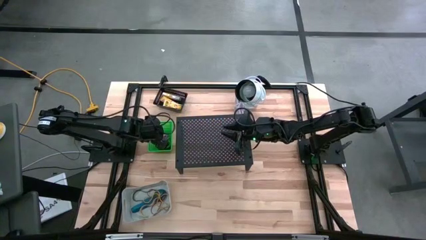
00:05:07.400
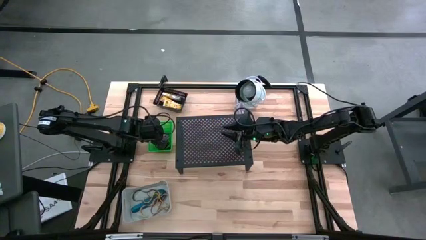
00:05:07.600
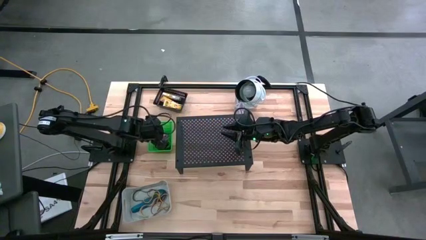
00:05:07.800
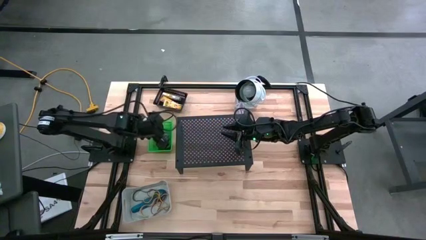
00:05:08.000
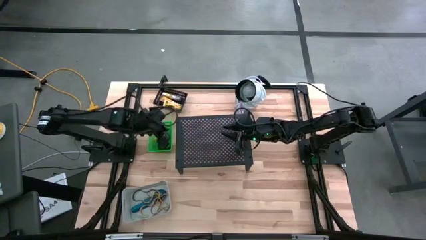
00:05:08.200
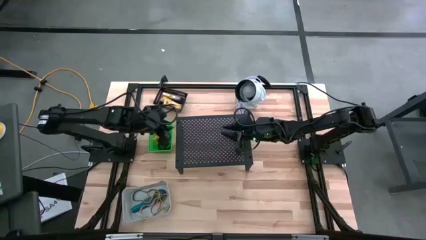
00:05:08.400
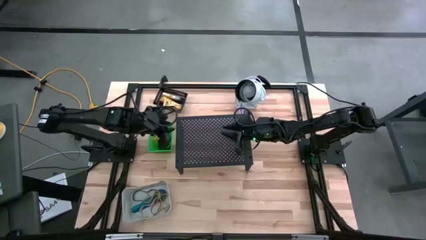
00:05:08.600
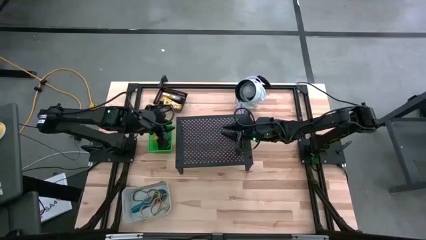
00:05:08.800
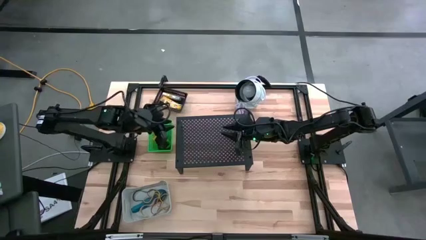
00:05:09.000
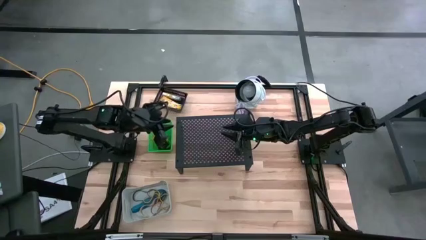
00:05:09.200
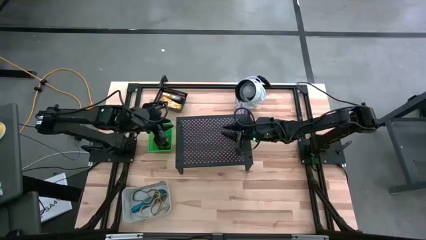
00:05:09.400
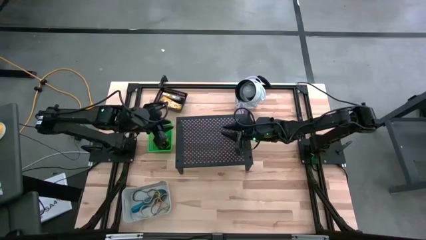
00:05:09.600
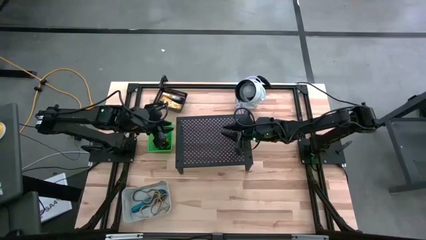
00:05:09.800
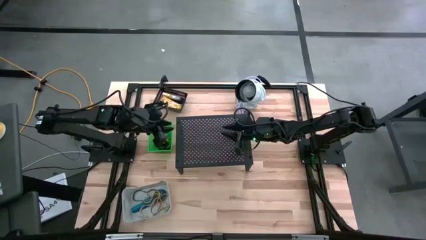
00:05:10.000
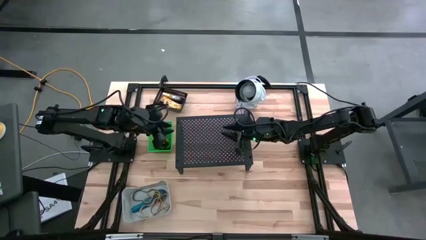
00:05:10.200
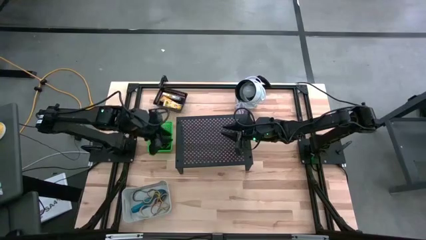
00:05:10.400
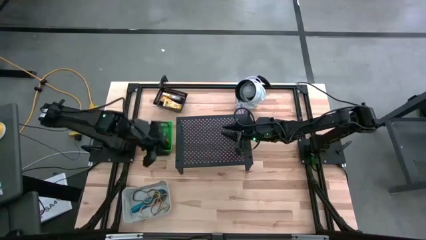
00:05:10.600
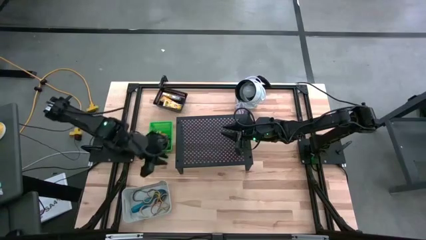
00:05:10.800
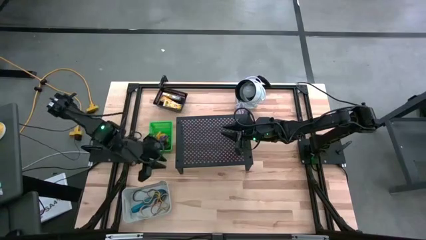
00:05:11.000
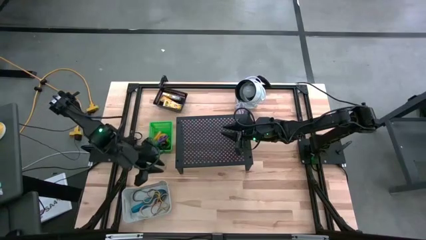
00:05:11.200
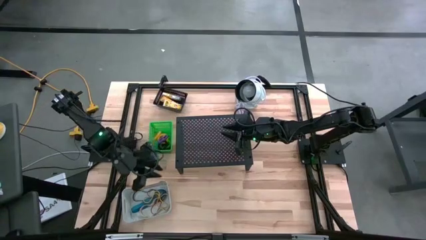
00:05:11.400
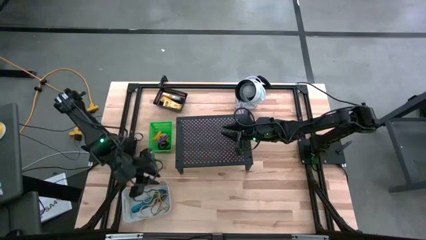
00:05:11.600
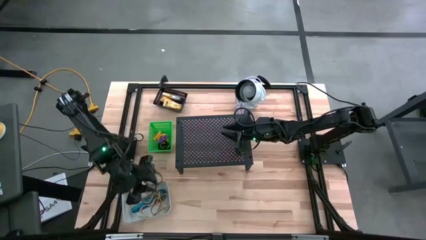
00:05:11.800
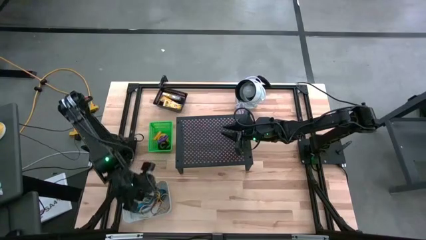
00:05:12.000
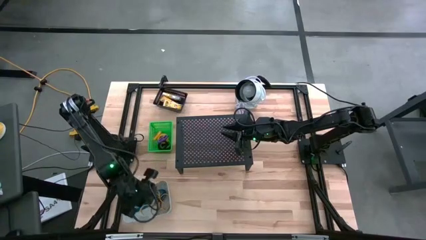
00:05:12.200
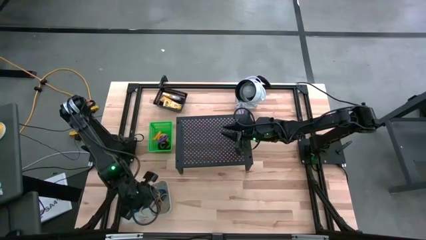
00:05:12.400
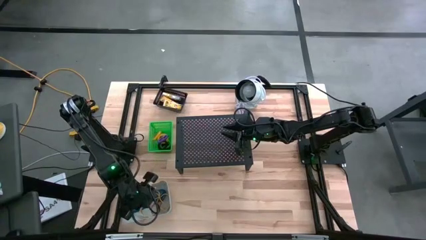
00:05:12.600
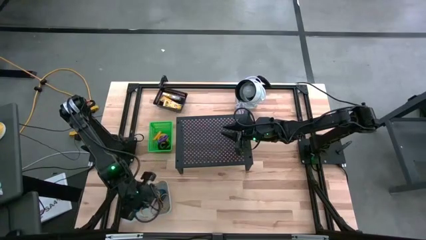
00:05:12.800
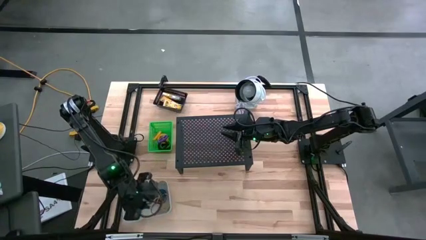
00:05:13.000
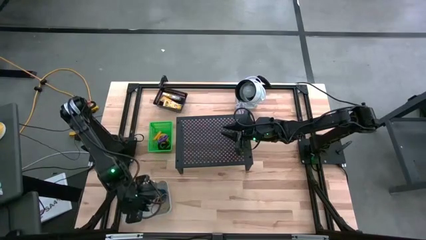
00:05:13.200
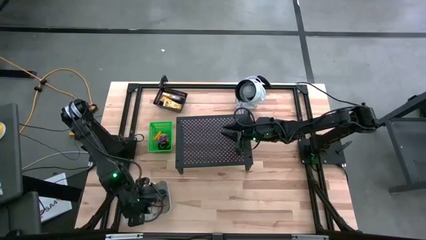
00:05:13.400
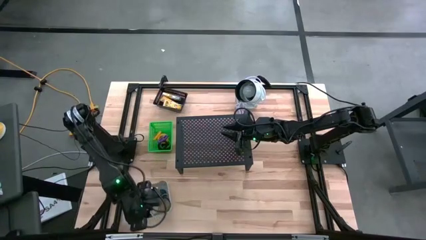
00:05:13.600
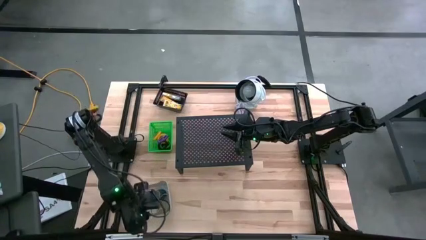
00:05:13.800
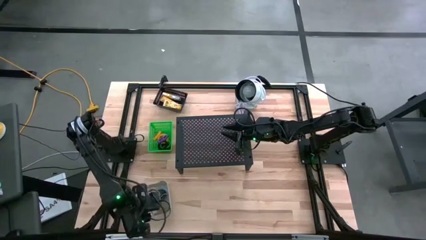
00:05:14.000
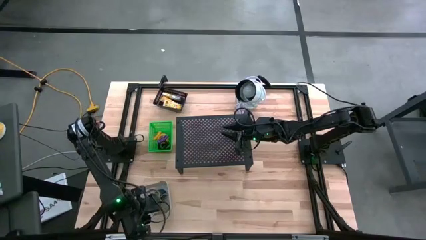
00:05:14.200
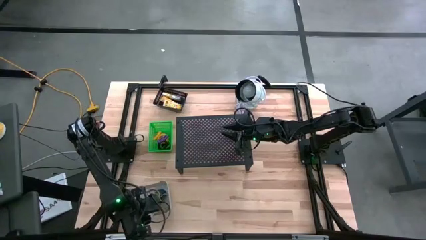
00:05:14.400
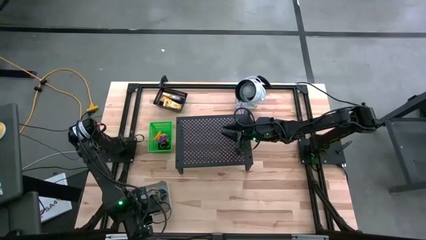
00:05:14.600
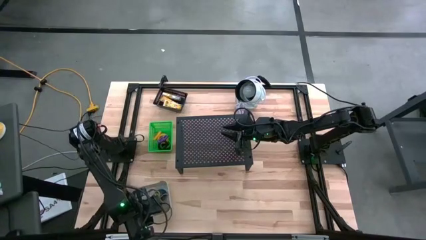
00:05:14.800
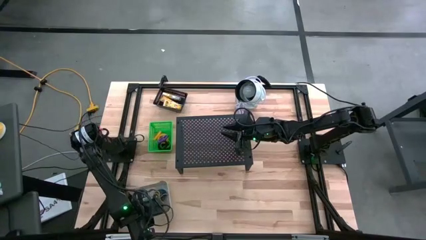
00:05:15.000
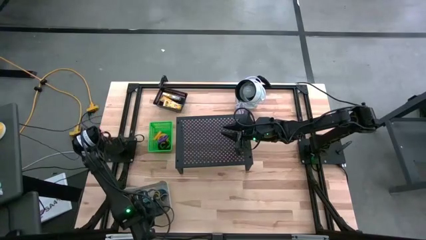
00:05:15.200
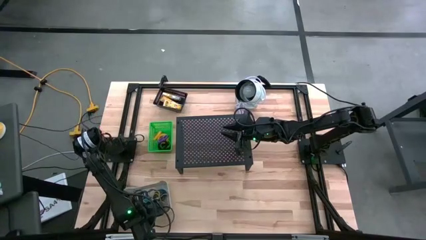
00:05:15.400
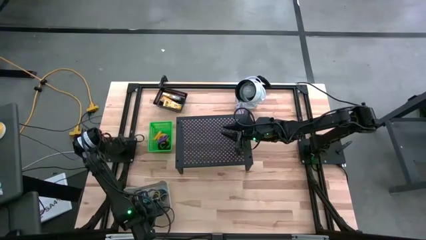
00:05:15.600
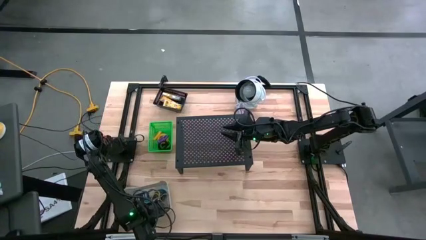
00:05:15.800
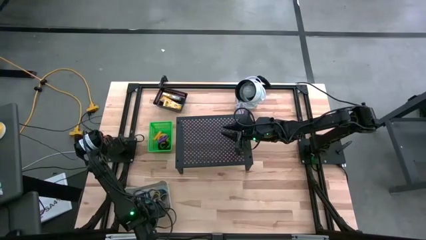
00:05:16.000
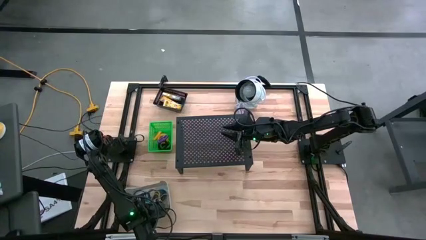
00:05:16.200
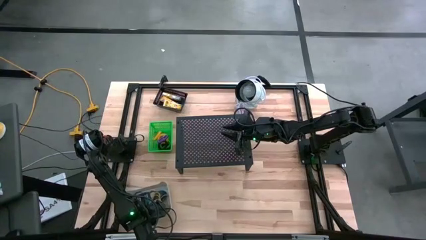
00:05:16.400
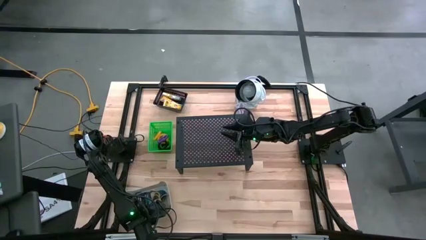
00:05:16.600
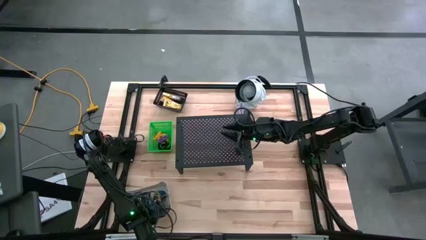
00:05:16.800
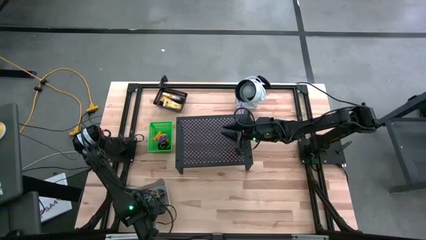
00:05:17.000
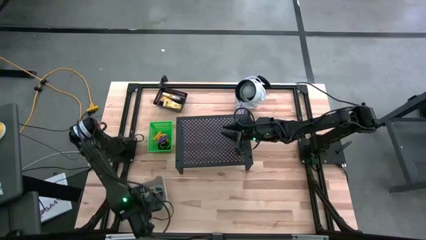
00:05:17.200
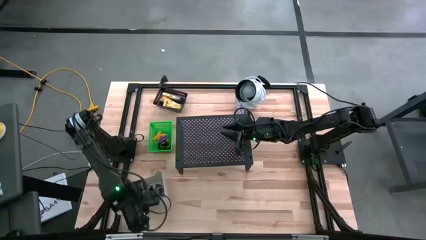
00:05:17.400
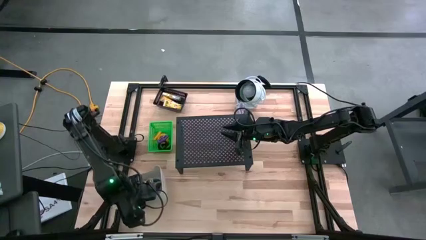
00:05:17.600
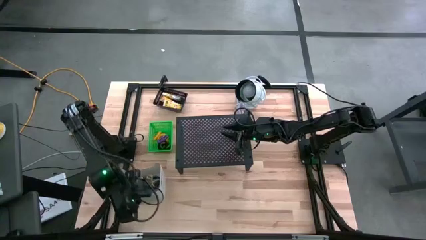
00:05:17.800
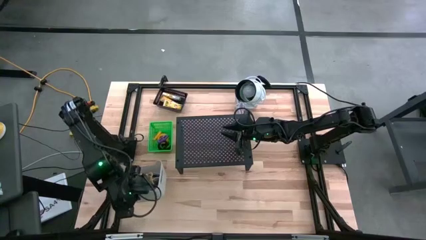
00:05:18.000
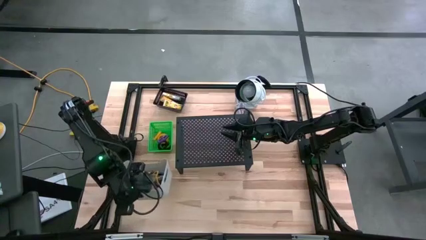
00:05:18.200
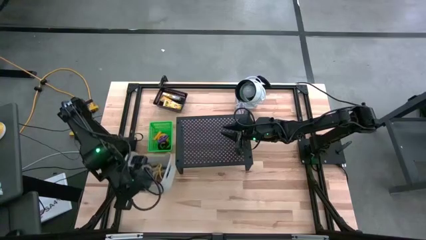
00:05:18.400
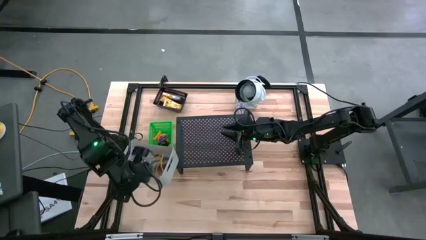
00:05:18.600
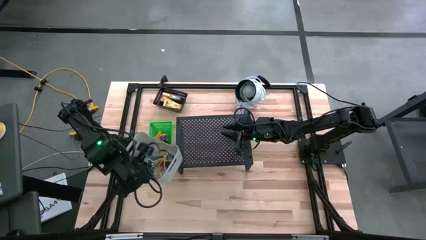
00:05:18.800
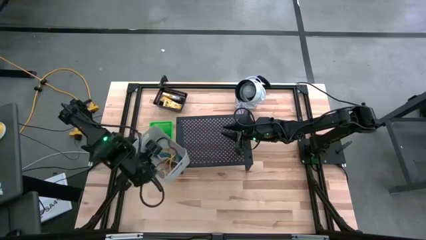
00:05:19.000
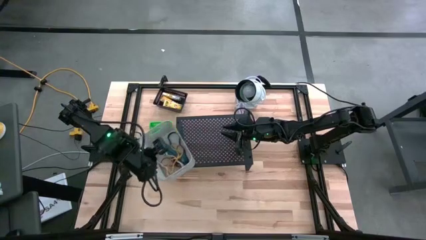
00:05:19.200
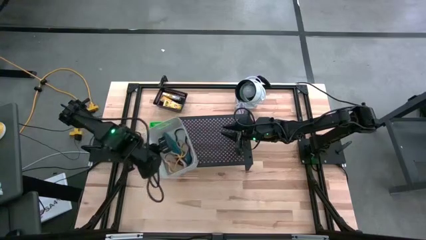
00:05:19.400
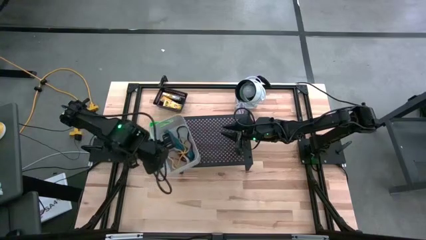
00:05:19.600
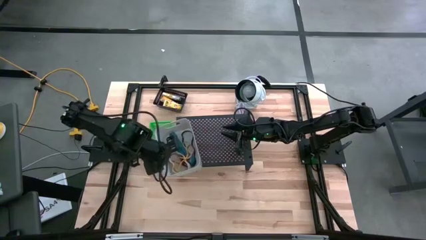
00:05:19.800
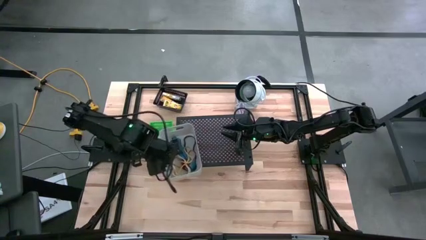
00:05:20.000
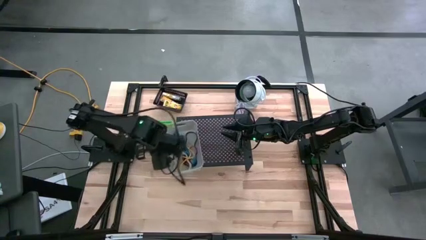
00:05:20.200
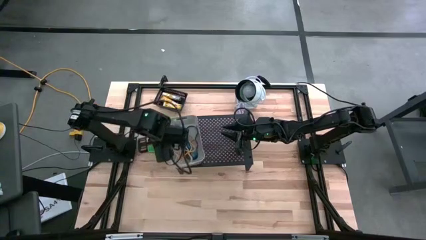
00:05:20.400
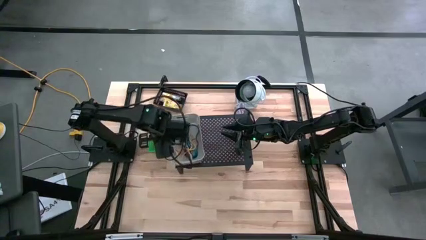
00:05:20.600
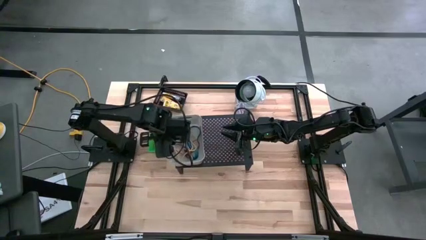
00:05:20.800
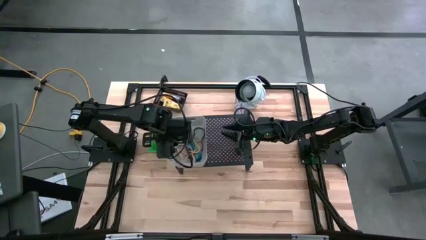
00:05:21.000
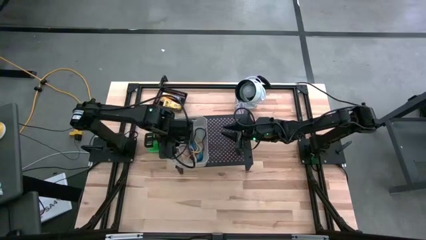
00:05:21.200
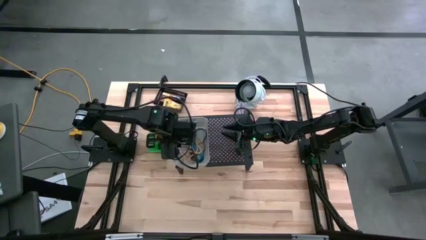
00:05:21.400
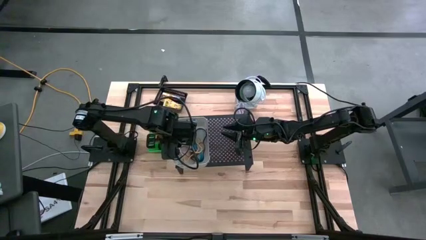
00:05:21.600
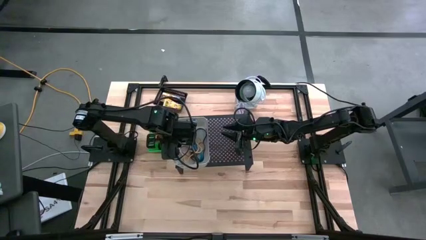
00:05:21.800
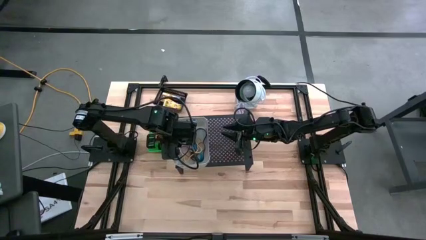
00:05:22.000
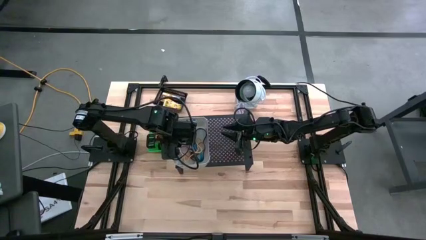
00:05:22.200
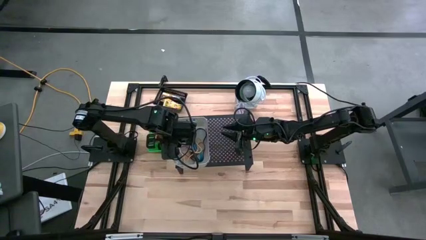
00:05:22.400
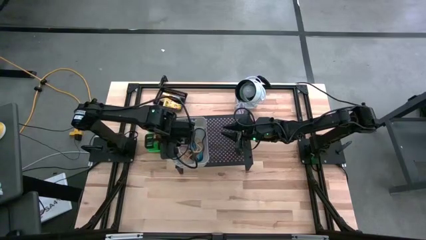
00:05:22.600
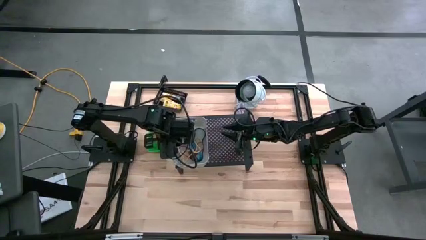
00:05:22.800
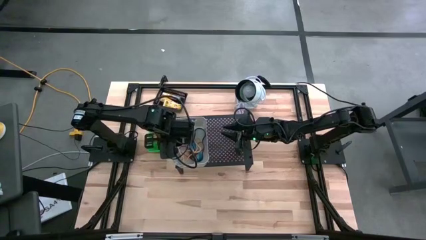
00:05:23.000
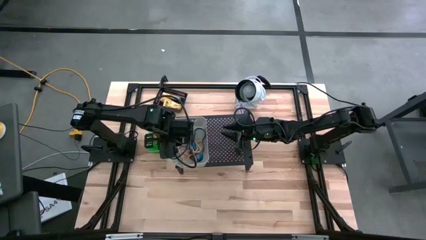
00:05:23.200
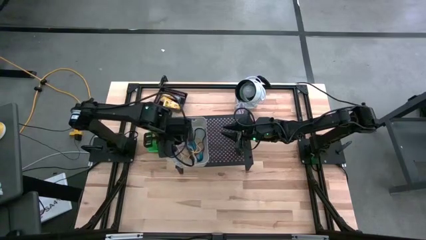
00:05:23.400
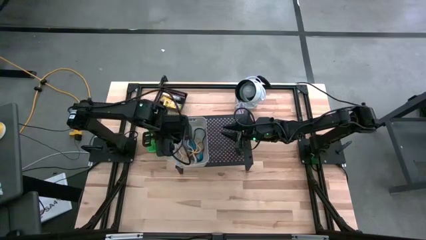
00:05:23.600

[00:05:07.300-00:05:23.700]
Task: Pick & Place Office Desk Supplies
Put the white bin with the rubber bands on the shelf

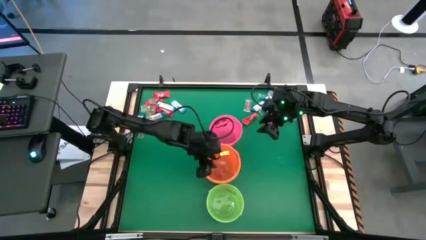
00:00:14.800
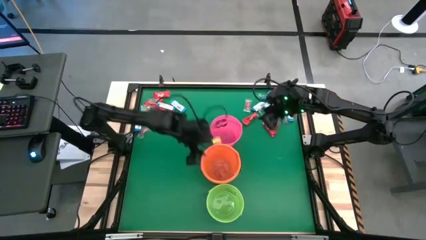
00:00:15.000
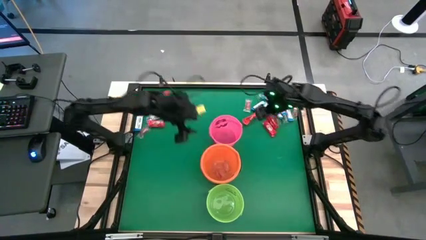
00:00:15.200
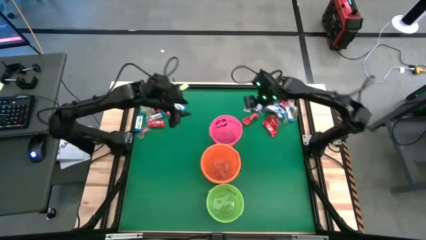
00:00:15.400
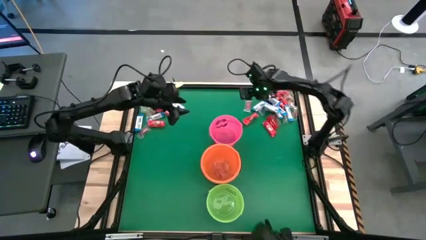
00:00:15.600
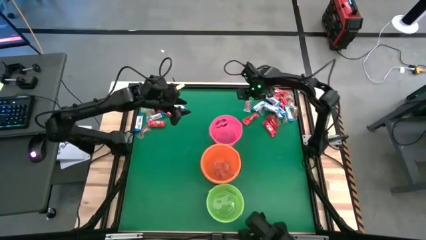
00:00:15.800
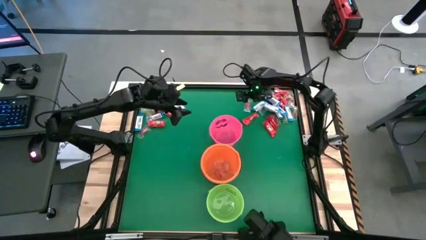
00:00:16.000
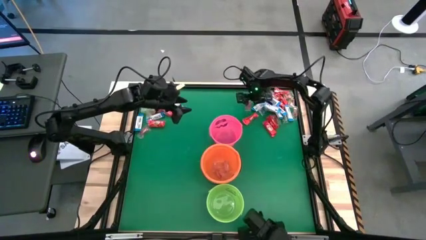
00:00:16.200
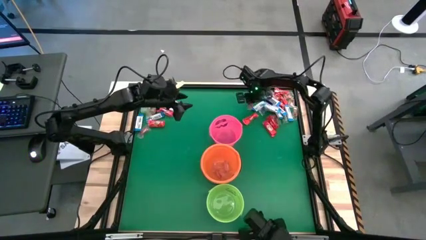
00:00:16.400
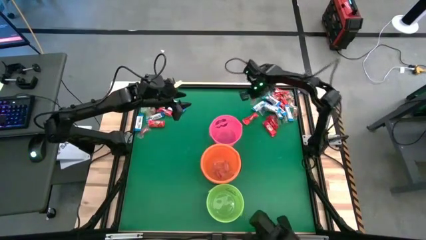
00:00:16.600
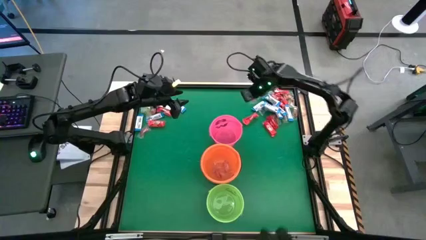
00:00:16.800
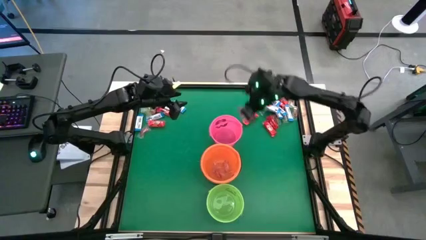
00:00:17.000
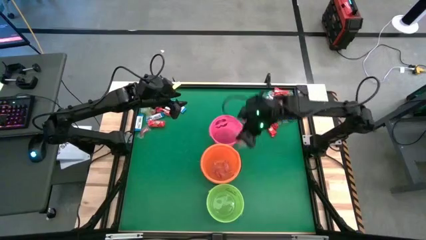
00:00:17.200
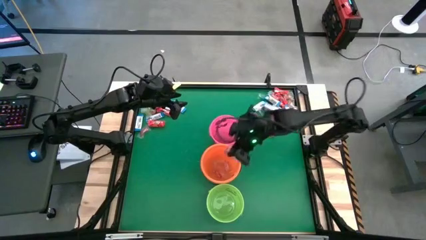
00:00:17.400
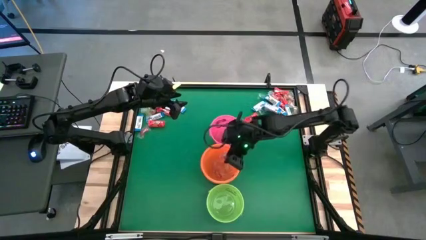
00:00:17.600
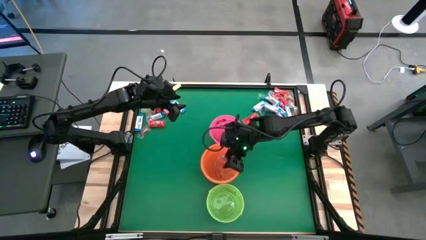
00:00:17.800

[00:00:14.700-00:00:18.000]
Task: Sort candy by brand, put in halloween buckets
Put the orange gummy into the orange bucket
